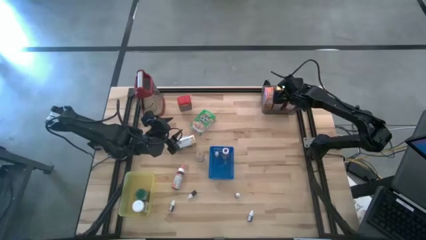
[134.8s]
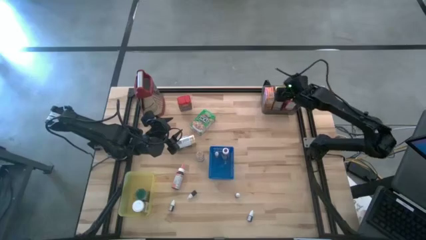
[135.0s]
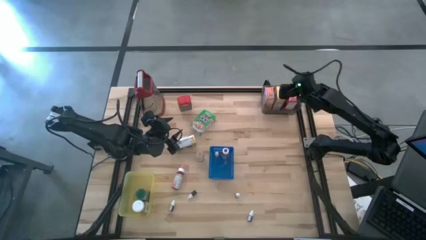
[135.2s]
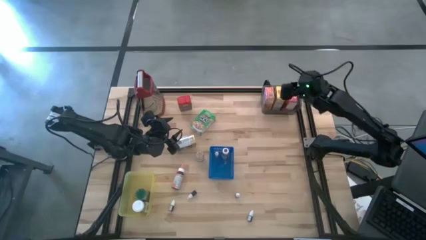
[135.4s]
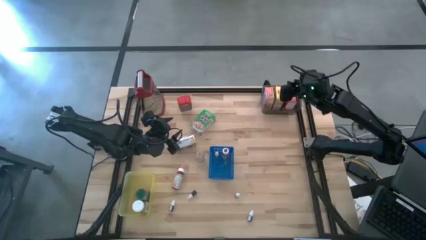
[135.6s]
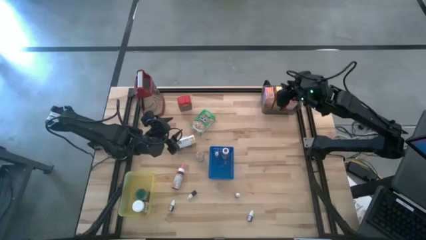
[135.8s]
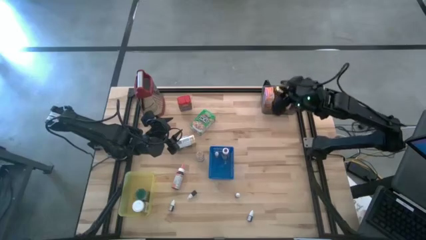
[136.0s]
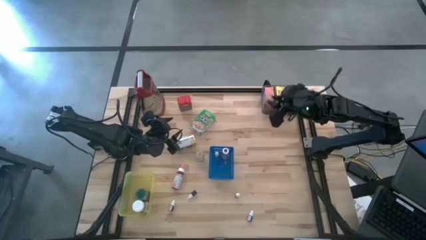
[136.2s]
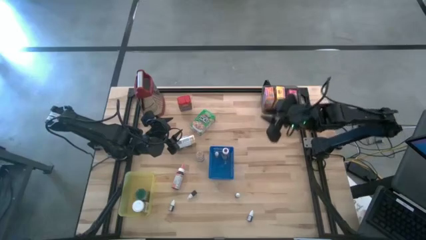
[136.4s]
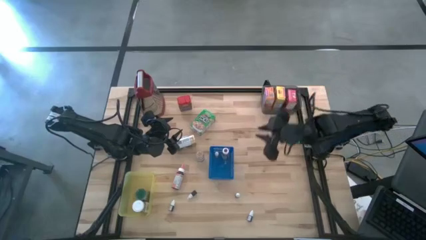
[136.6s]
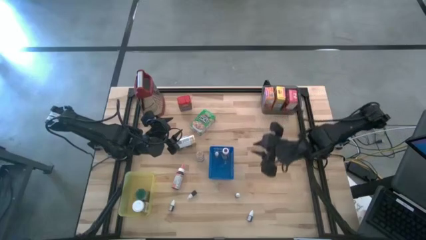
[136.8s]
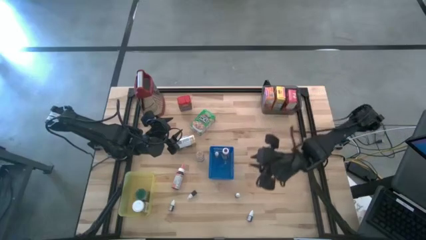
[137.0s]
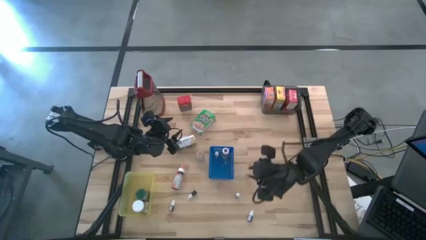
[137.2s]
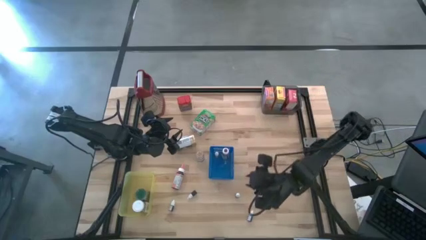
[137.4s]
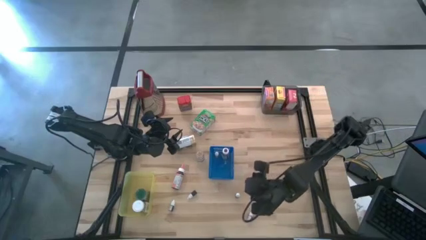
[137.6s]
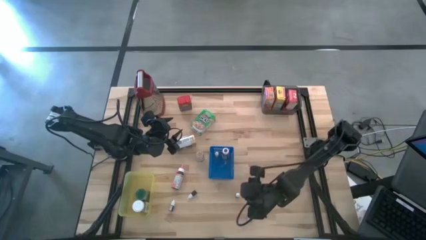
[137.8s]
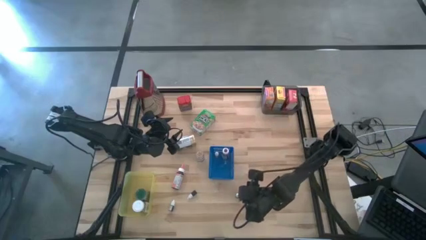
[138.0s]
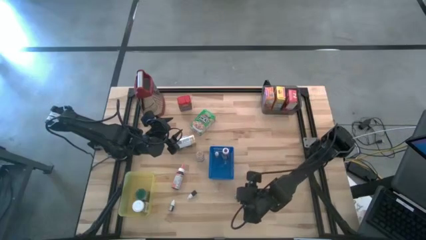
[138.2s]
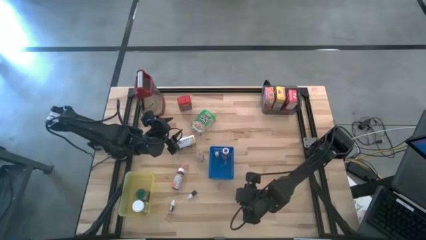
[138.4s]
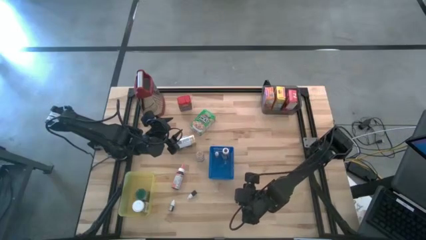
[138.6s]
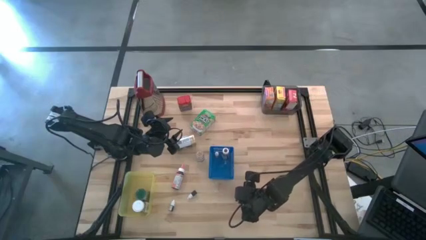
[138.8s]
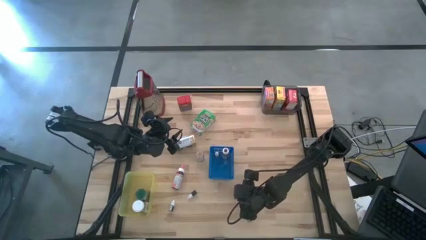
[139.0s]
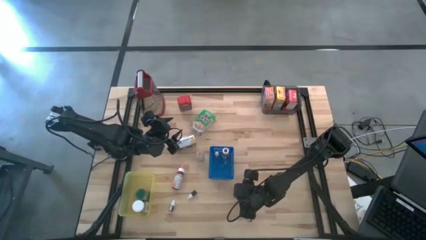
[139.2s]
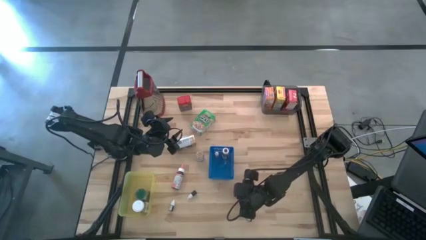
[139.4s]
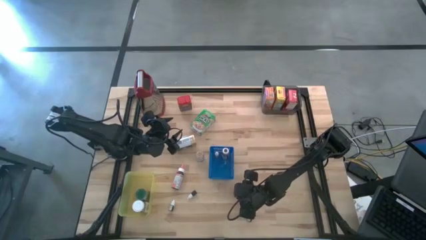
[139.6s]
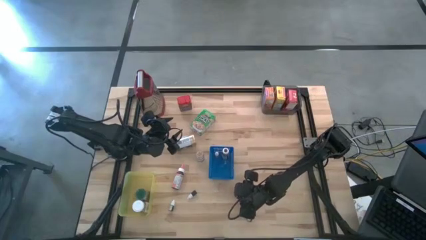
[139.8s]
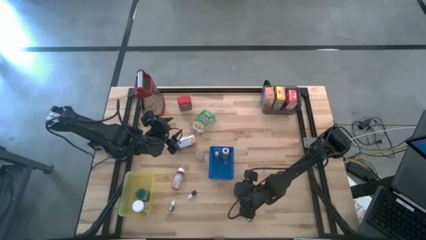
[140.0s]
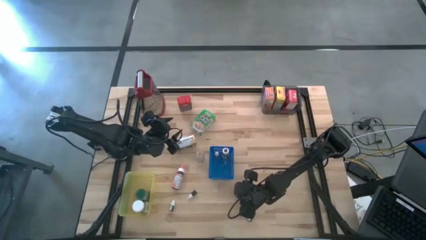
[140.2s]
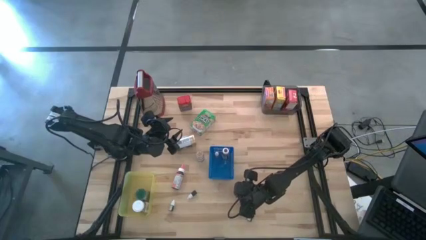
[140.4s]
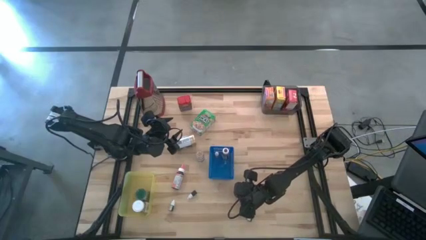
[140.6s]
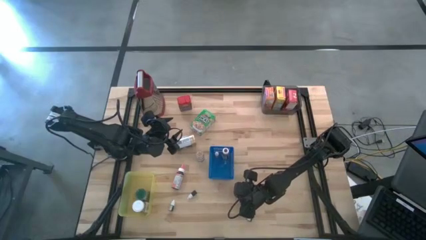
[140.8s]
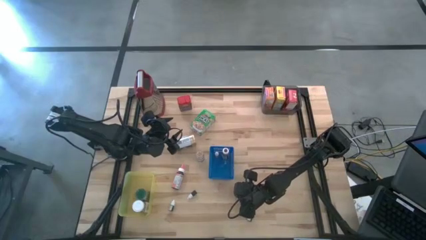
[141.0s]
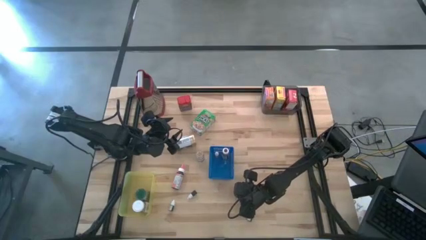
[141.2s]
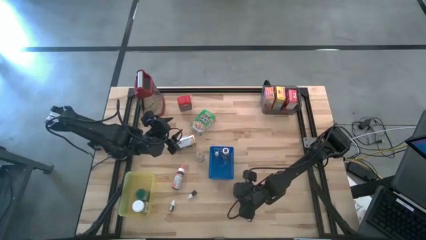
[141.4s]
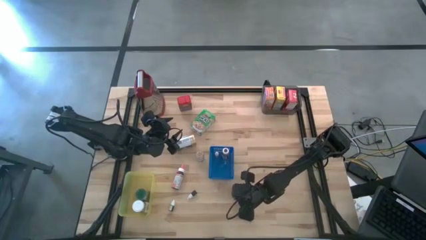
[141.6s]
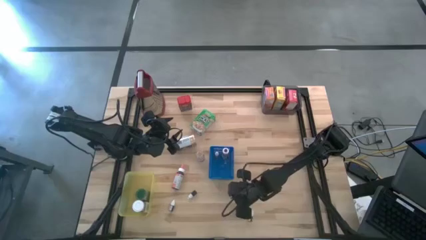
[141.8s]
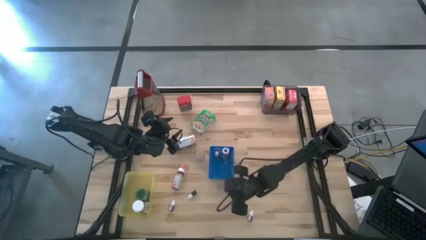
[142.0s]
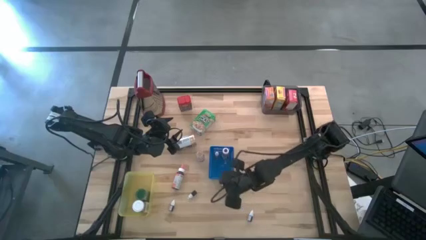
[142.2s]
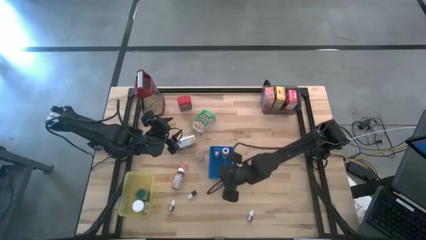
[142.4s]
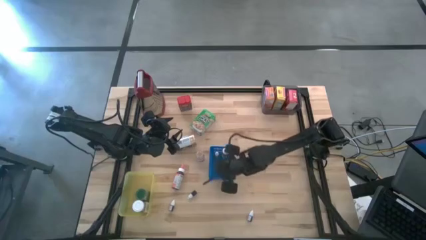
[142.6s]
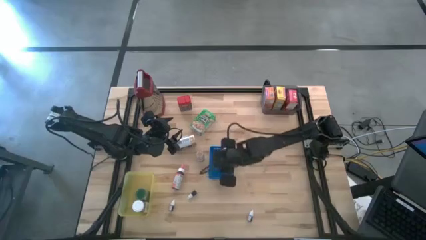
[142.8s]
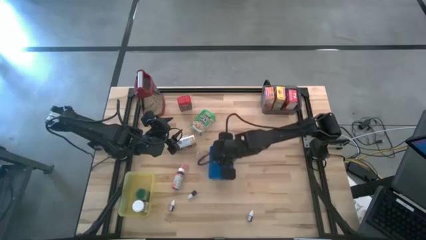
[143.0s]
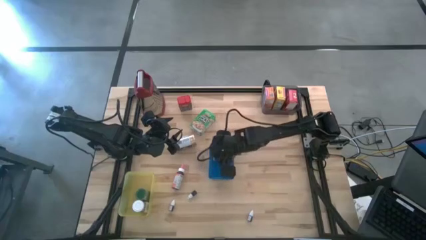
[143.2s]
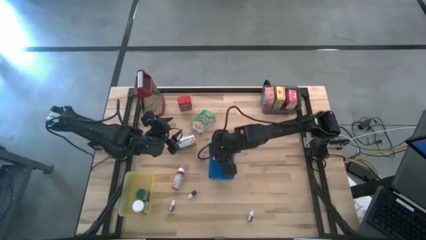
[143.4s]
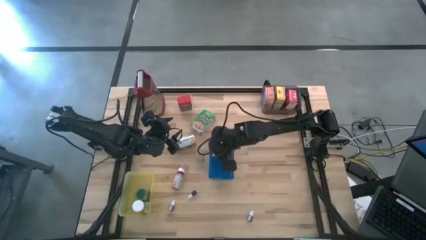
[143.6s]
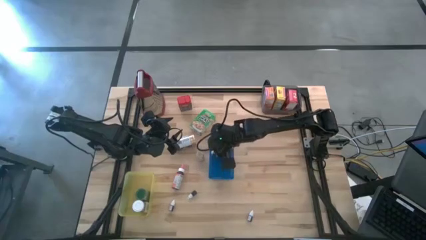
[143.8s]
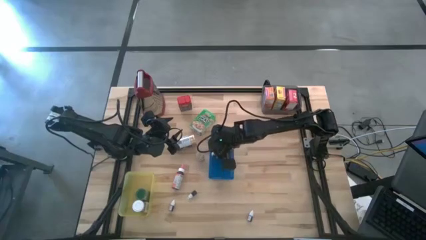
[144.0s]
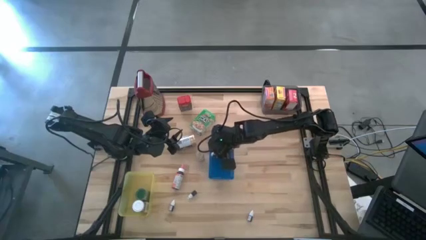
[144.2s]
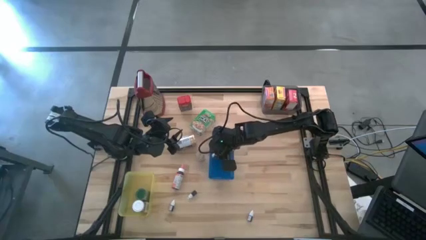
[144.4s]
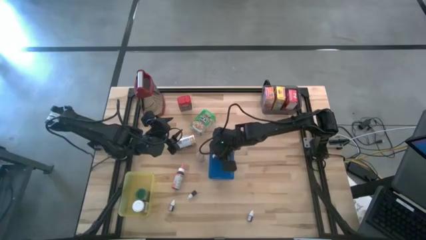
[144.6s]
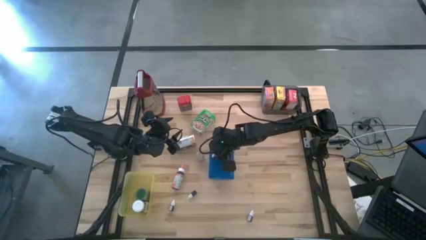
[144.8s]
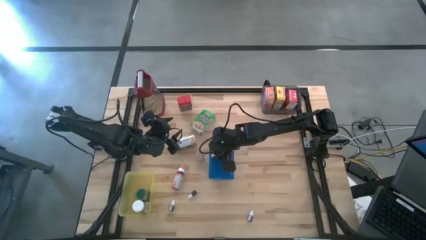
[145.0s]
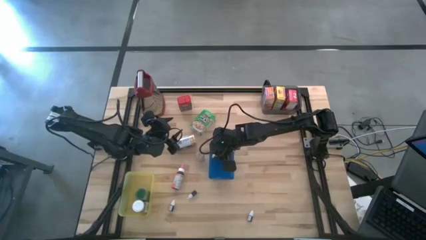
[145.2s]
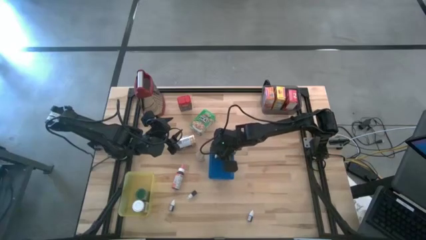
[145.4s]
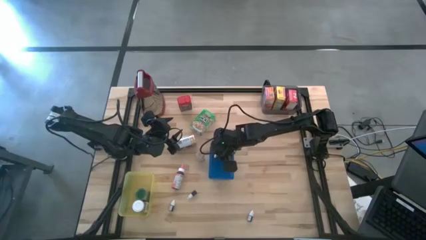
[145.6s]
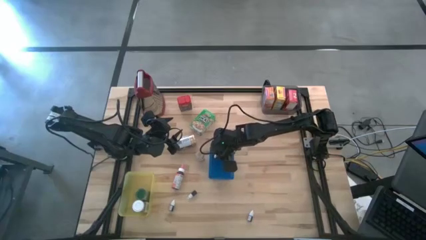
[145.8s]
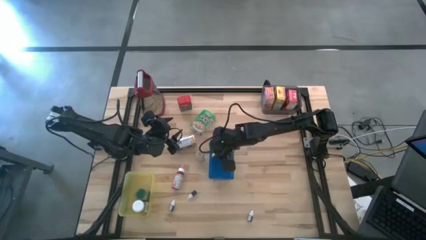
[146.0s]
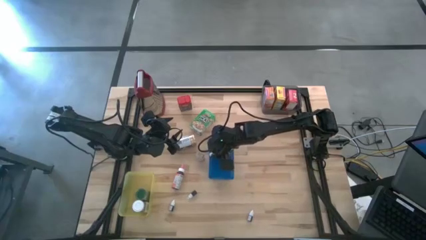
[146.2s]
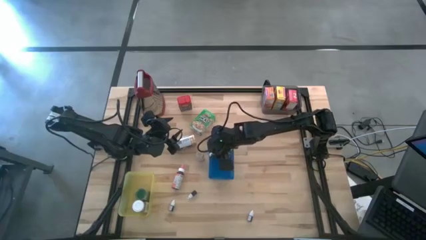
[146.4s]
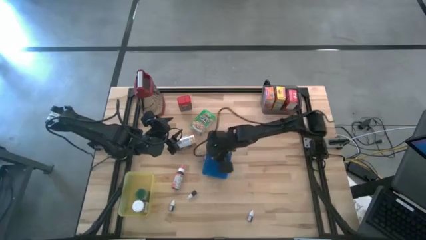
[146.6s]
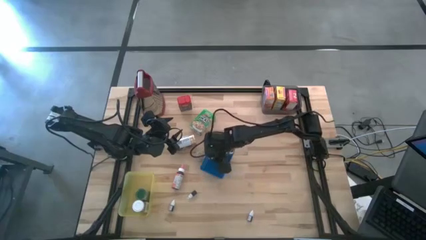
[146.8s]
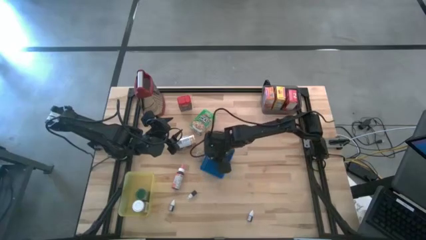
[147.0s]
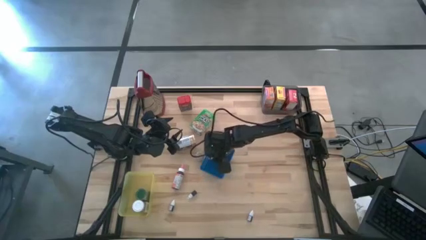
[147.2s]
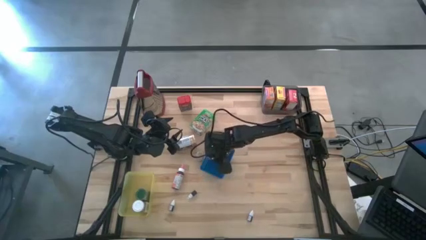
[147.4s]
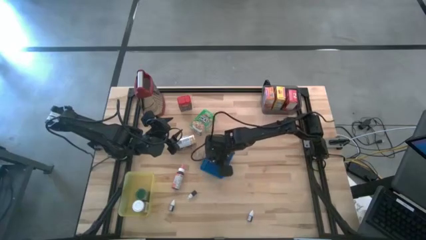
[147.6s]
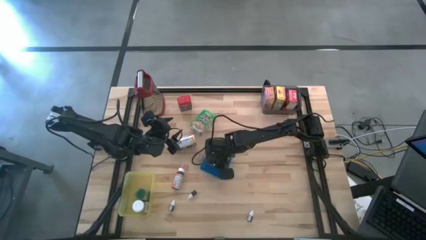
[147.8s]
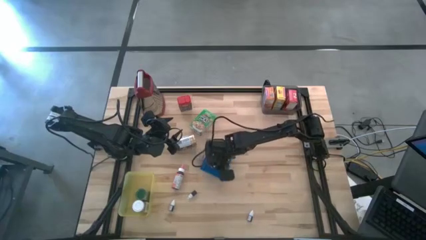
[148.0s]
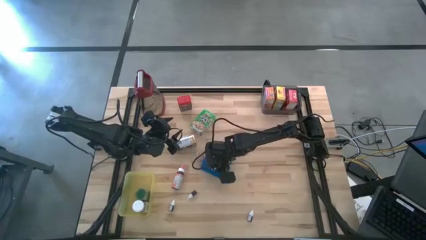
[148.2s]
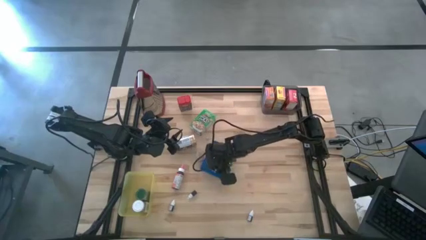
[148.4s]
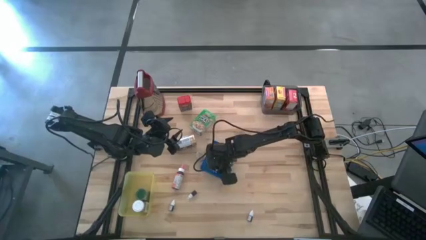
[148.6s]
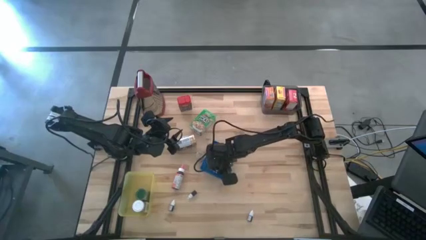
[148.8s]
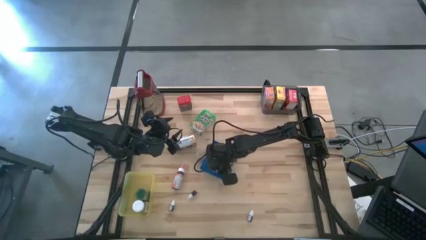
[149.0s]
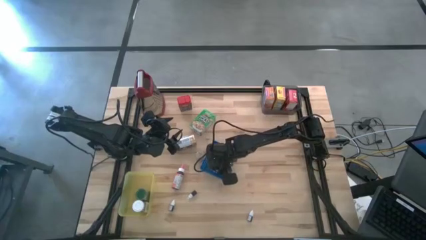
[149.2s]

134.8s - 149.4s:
Task: Pick & Place Kitchen Items
Put the small green food coloring bottle into the blue bin

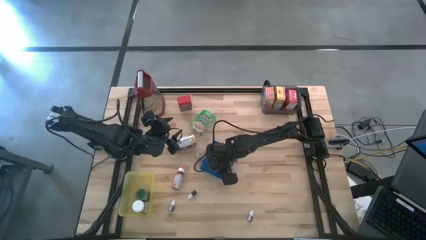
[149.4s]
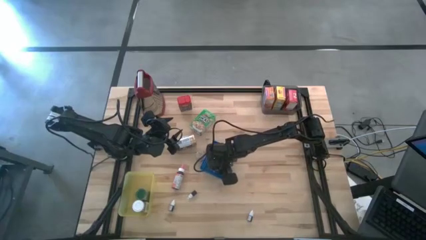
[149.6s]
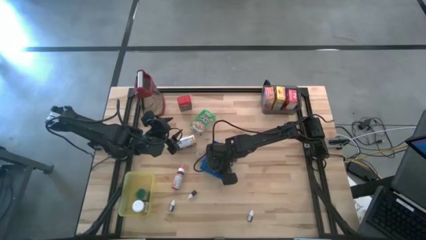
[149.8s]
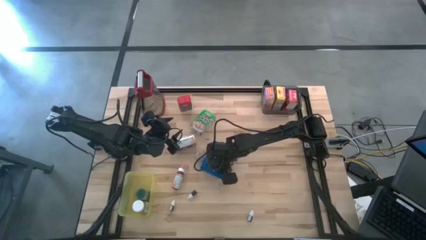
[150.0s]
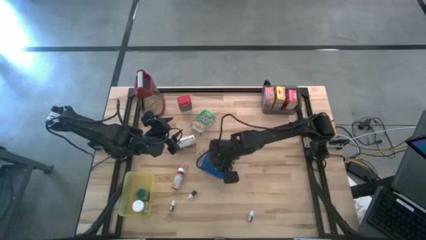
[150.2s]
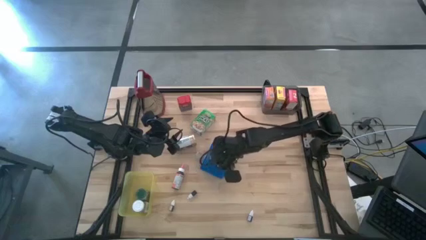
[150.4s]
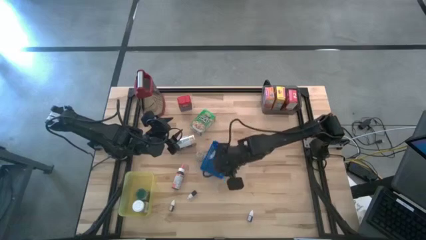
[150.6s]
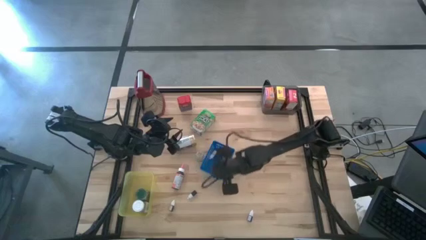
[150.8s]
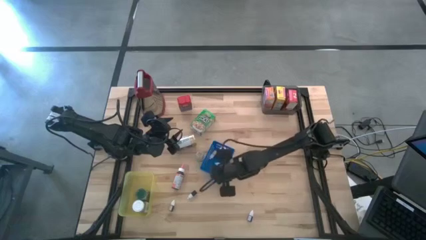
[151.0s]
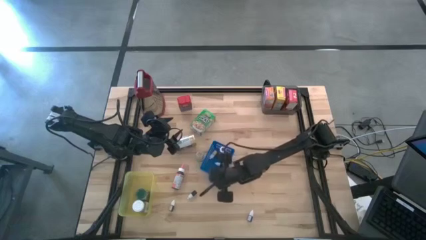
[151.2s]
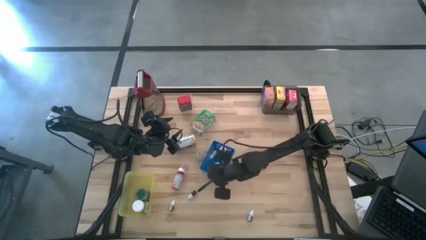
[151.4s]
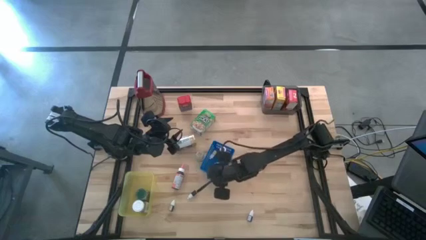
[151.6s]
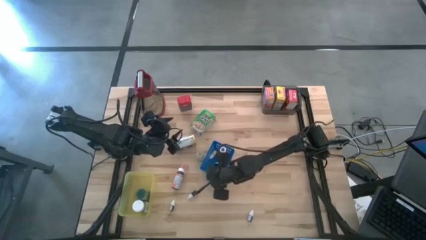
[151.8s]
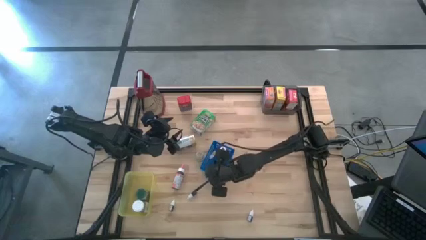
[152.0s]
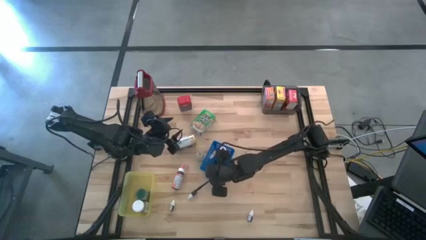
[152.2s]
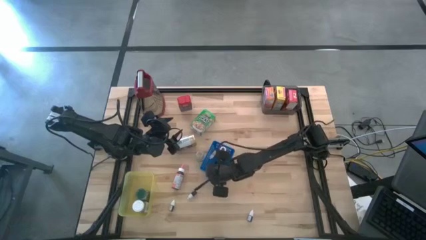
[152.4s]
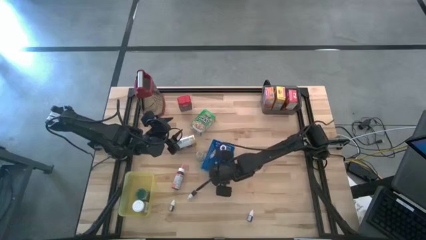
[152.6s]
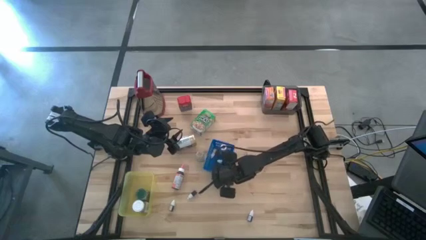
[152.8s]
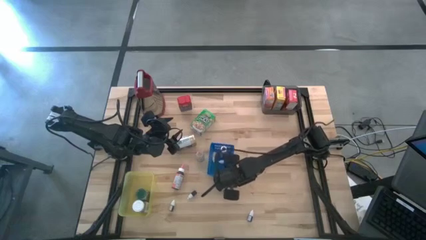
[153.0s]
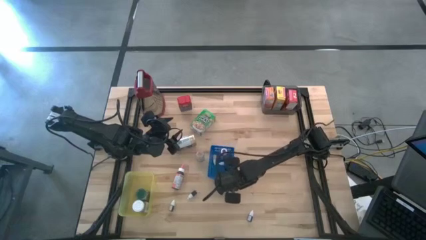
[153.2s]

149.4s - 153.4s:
Adjust the blue bin on the table
